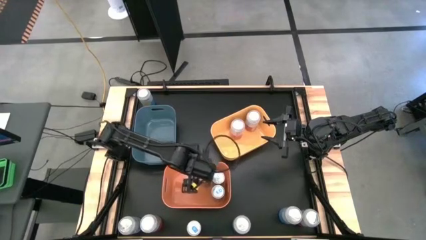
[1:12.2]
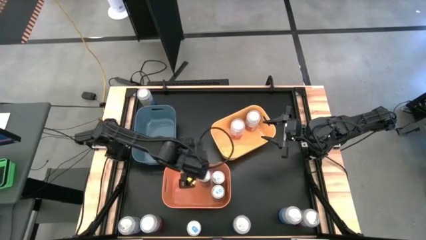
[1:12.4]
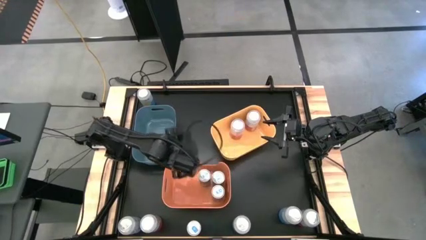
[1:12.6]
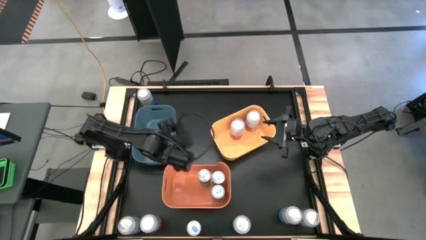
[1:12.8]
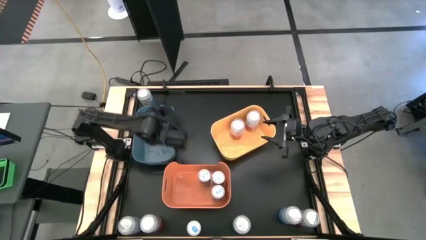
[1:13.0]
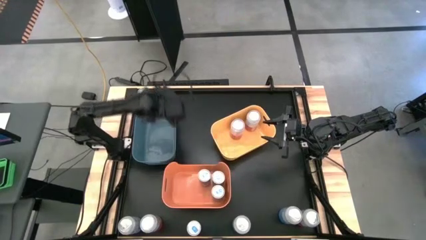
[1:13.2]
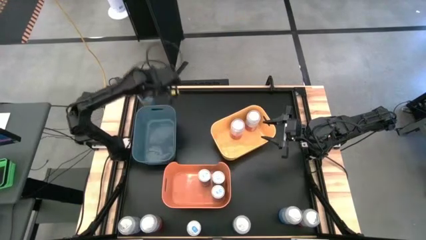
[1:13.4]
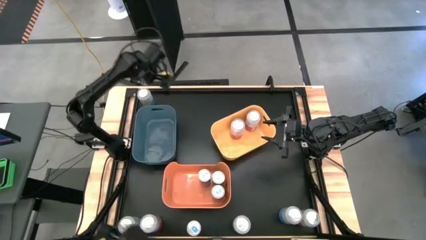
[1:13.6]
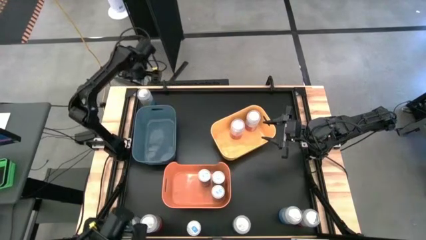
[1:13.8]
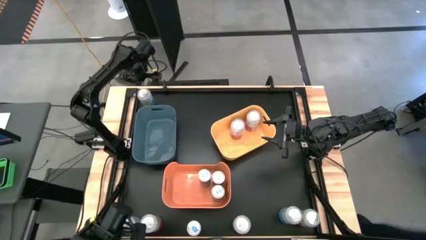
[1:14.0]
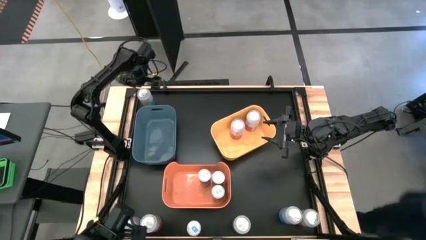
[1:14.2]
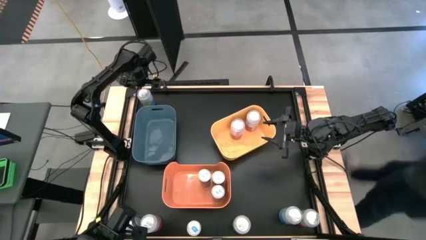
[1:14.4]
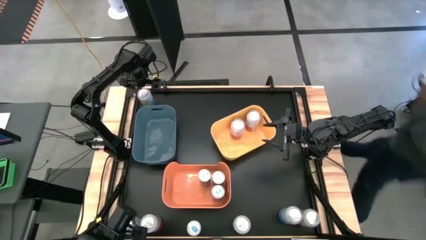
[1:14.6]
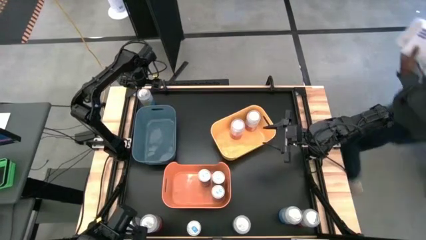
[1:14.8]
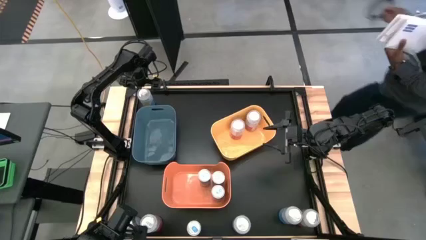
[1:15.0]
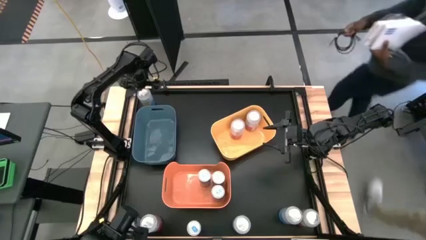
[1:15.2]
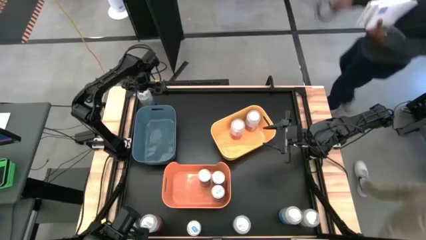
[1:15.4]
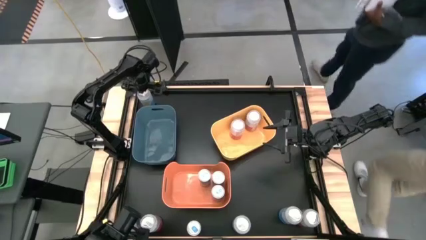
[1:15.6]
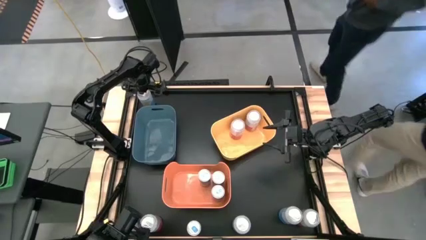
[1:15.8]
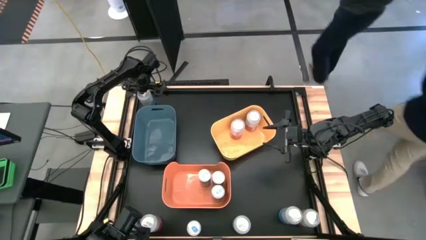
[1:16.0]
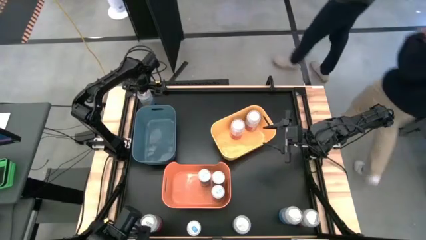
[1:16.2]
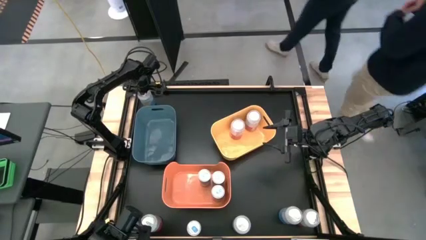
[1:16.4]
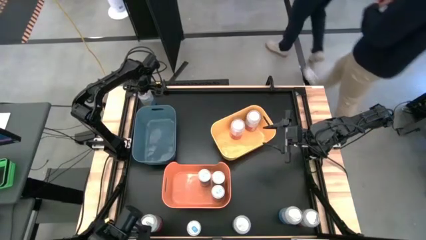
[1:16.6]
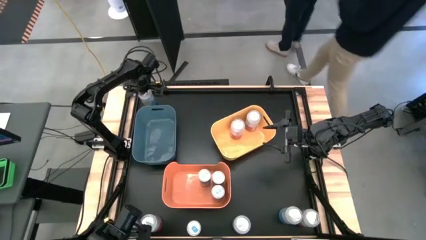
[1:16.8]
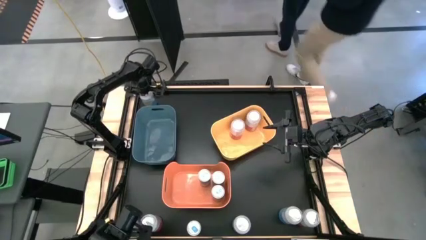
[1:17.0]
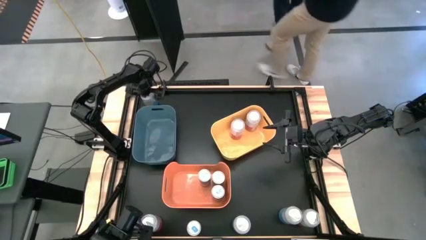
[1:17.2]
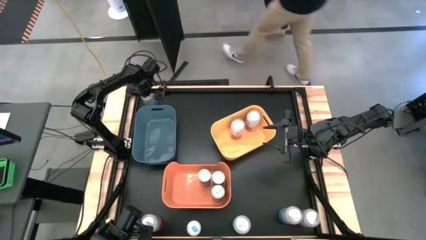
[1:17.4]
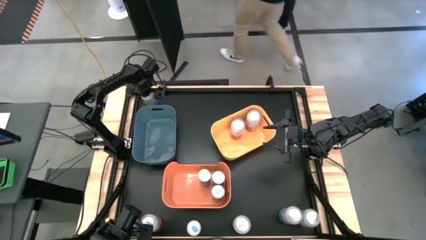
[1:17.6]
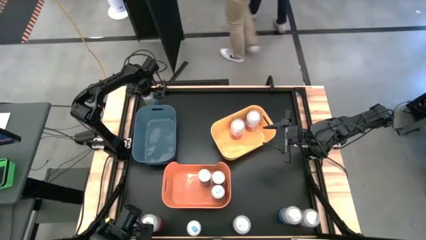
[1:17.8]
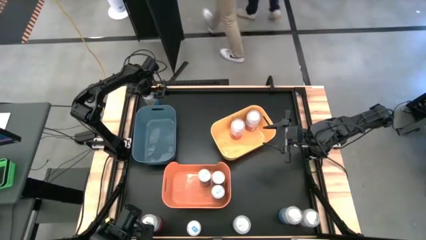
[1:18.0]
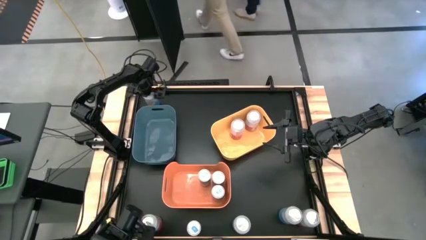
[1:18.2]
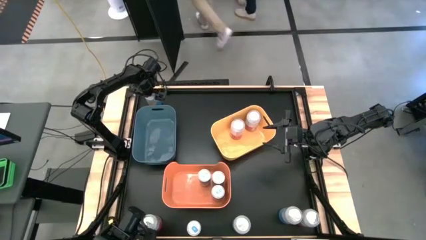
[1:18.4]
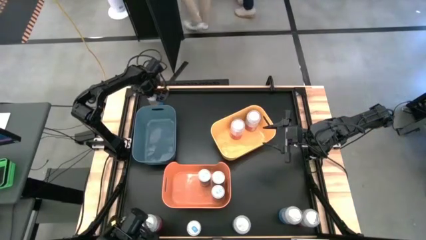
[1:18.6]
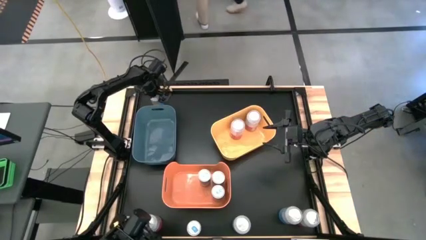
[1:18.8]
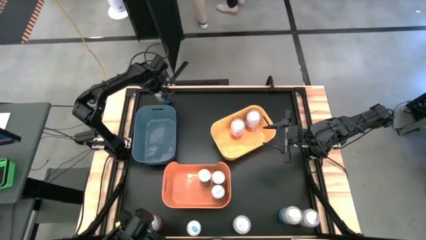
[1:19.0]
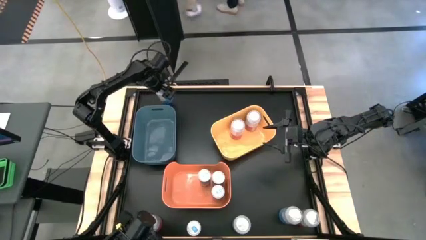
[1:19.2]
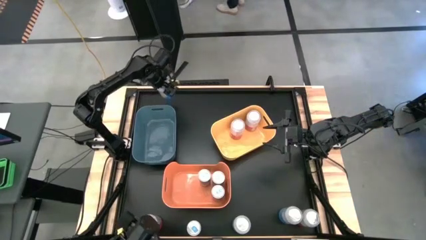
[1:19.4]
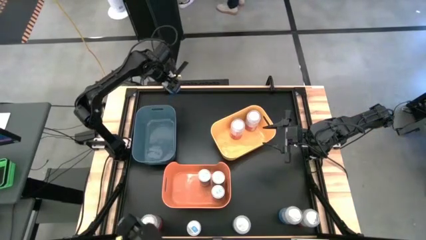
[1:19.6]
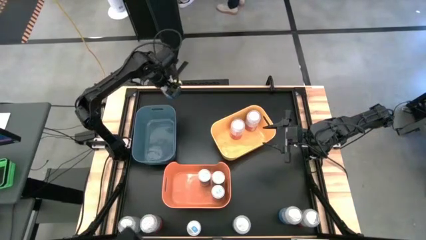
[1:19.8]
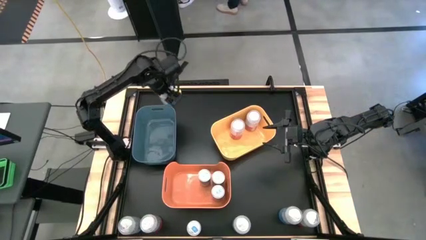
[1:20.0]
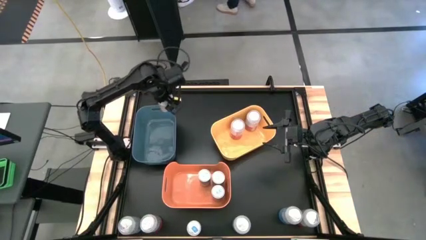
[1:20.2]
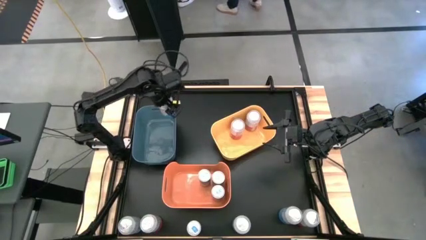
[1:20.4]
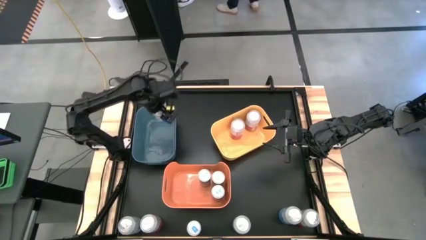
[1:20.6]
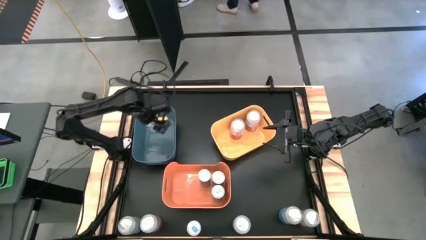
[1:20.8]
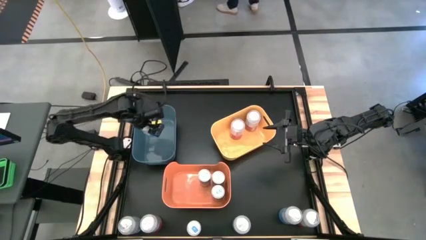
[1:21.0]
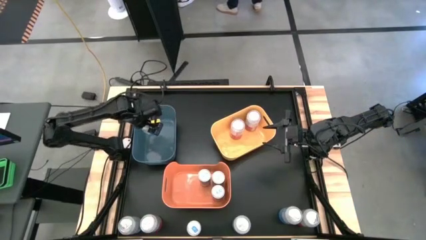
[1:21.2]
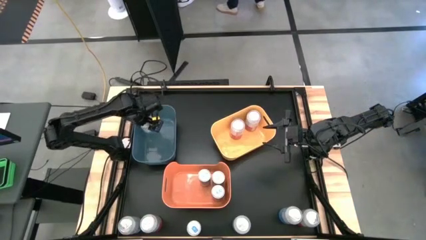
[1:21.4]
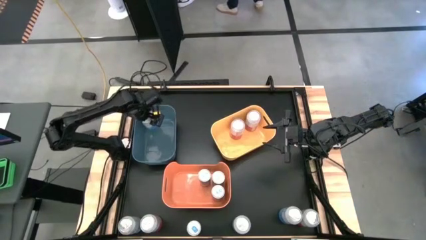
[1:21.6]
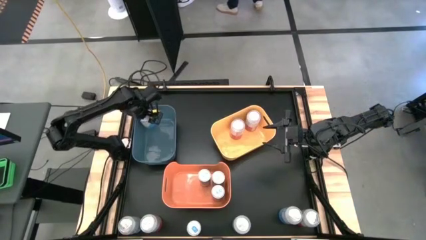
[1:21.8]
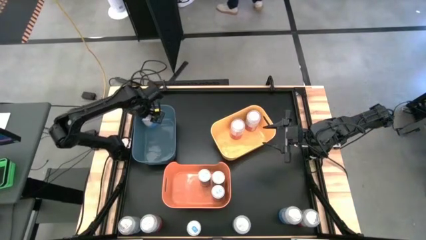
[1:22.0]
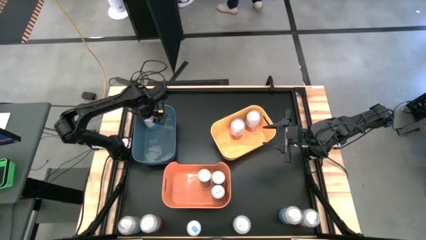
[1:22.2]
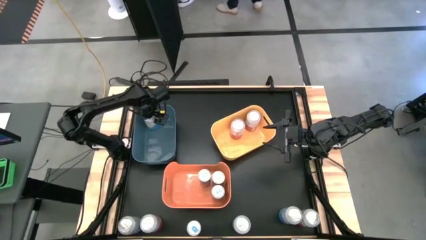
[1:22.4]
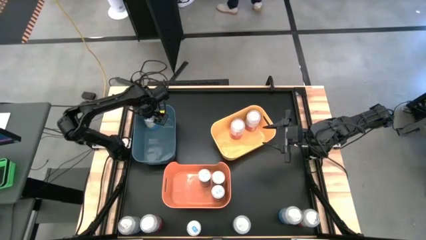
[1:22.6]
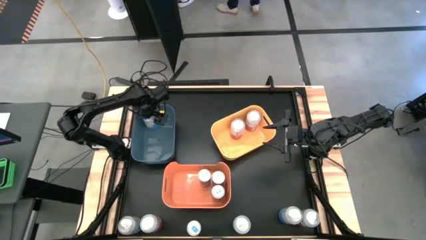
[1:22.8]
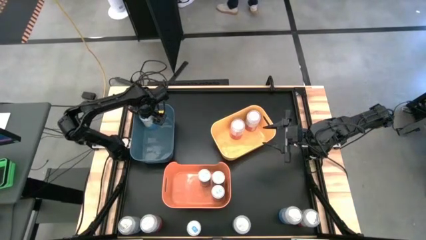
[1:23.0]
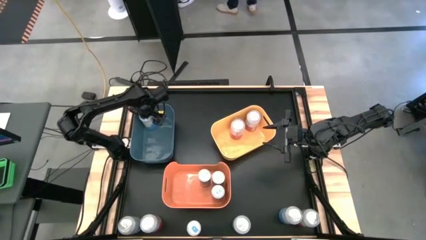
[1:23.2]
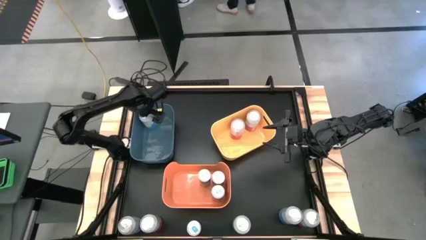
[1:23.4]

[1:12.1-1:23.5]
Task: Sort soda cans
Put the blue soda can into the blue bin

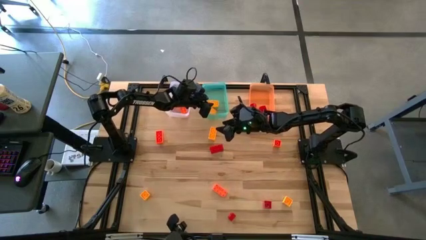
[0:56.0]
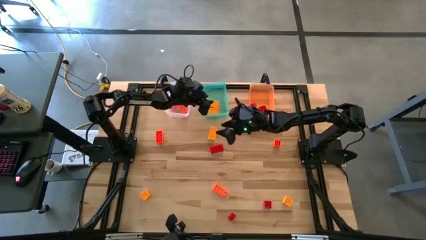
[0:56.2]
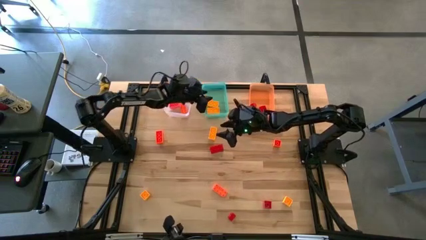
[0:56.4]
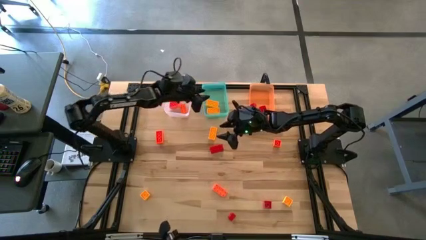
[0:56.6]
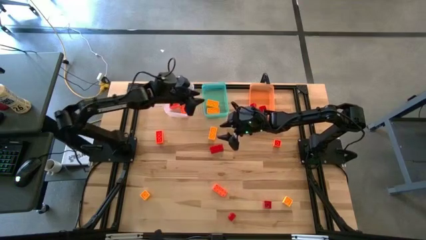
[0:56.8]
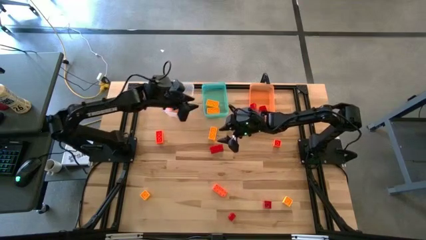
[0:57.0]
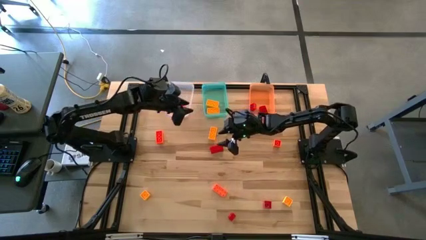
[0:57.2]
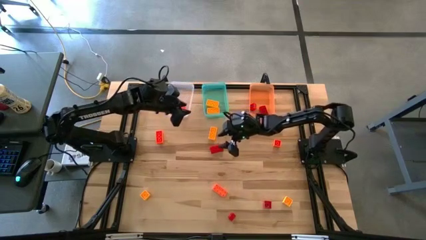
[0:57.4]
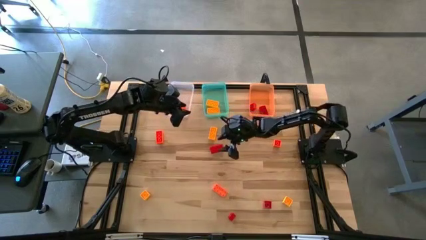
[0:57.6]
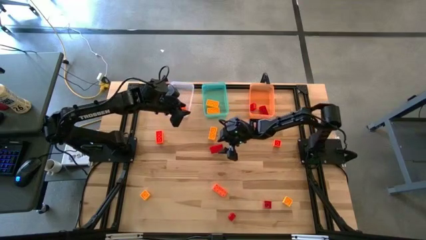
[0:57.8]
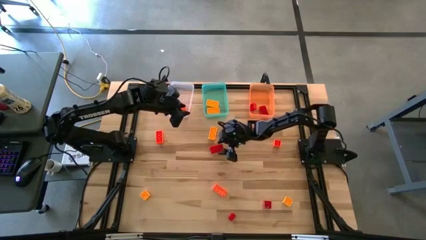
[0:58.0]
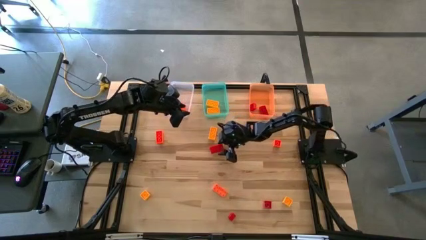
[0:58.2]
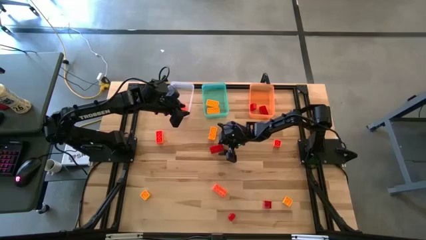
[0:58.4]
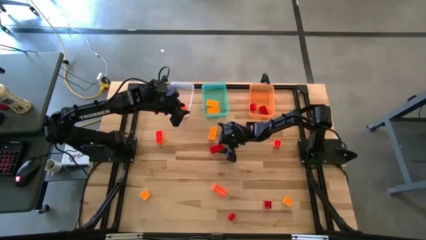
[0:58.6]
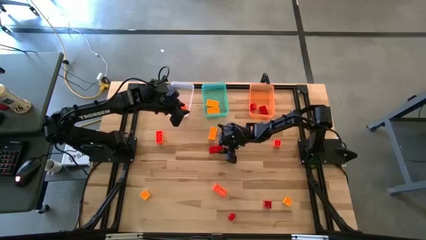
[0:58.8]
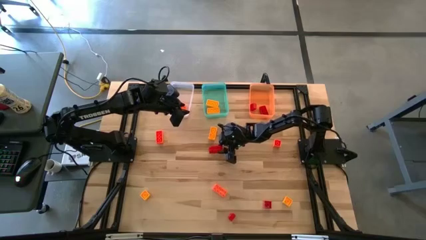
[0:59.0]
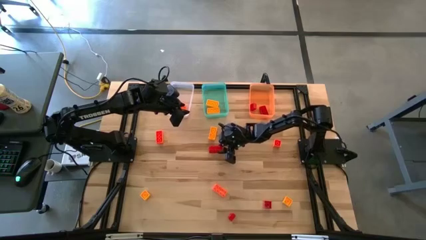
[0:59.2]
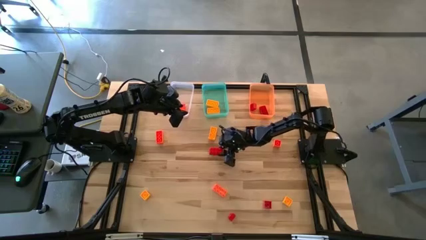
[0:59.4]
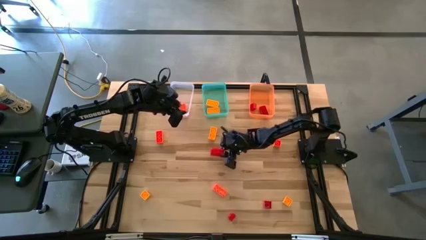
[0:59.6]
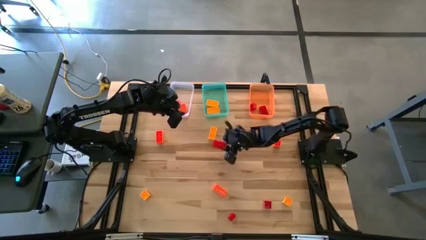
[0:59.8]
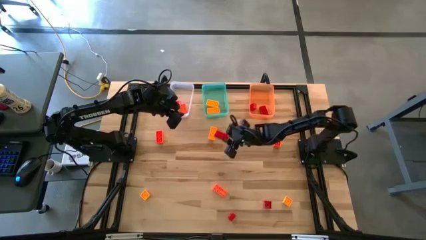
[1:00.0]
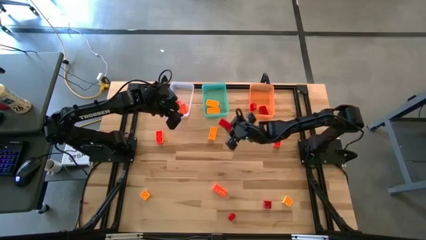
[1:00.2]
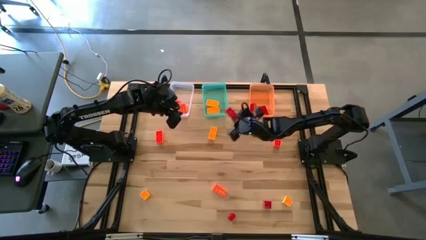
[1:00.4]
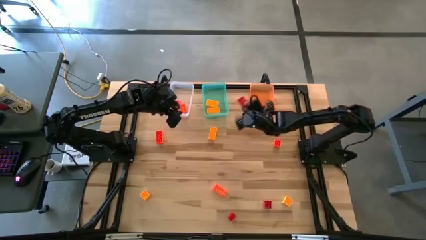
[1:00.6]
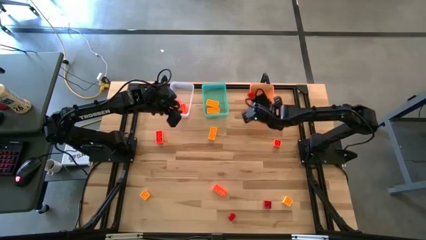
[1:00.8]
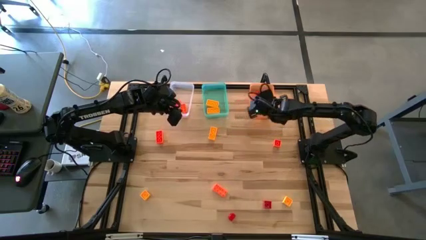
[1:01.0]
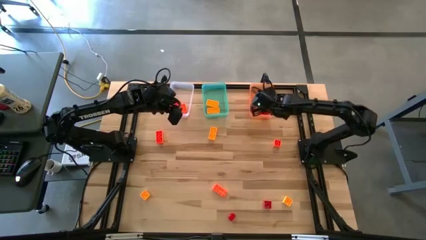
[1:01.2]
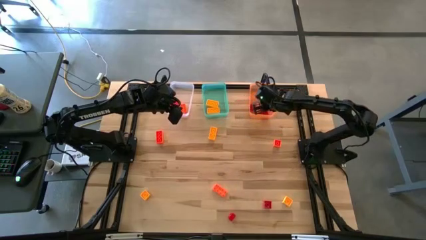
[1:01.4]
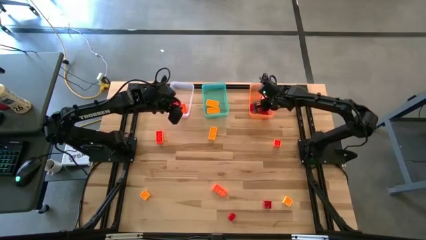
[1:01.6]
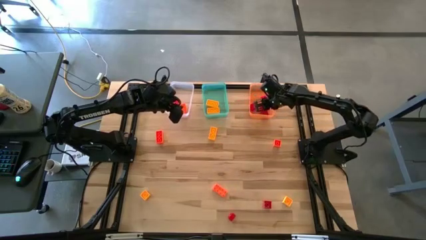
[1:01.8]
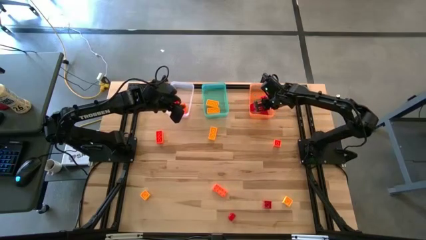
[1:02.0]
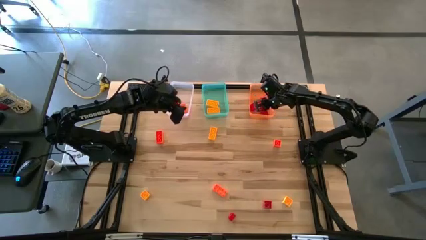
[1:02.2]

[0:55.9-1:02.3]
Task: Sort & place blocks by color
Put the red game piece into the orange bin
